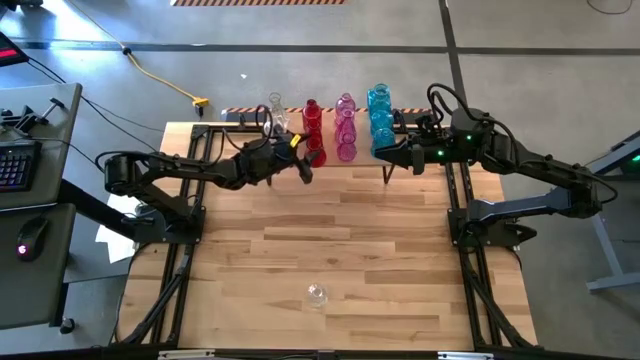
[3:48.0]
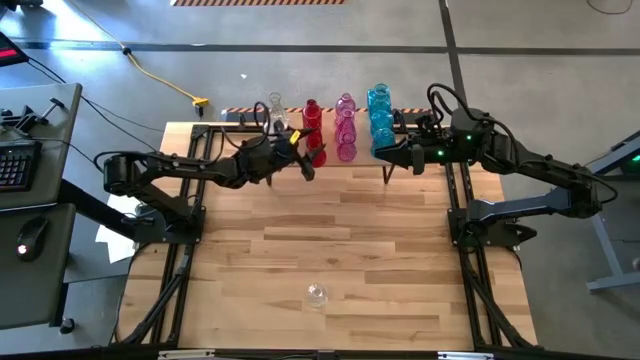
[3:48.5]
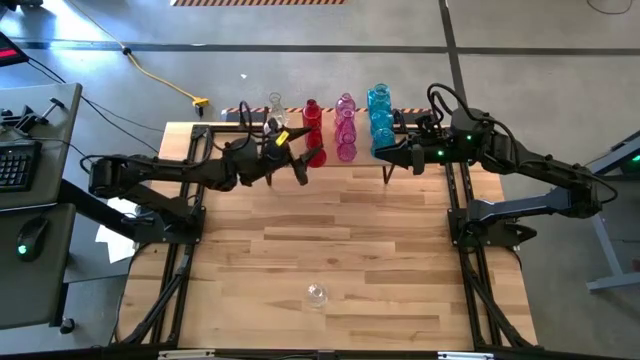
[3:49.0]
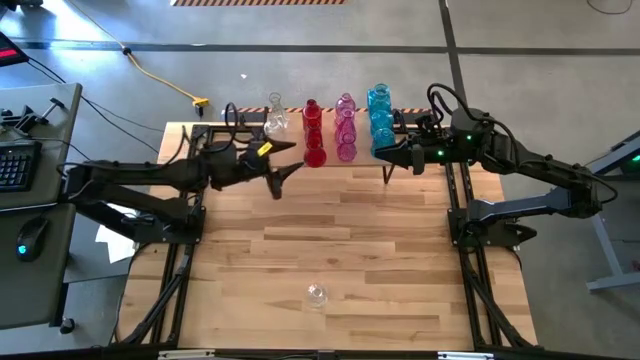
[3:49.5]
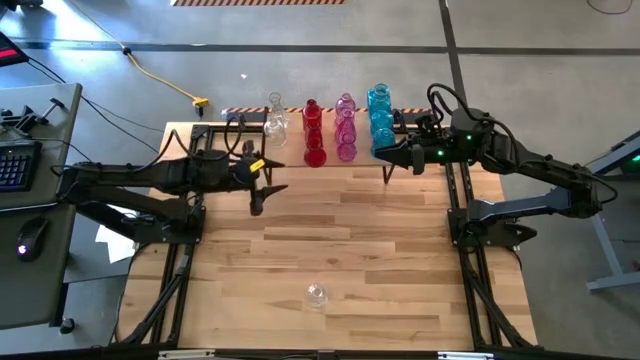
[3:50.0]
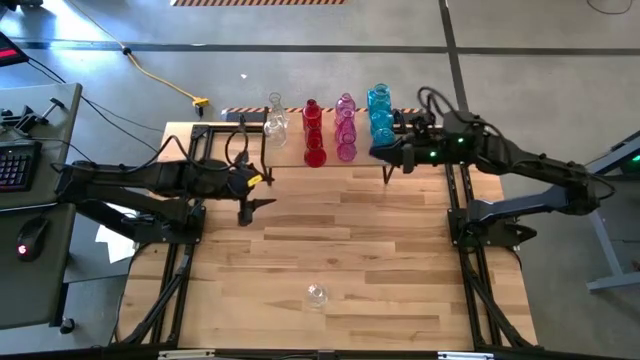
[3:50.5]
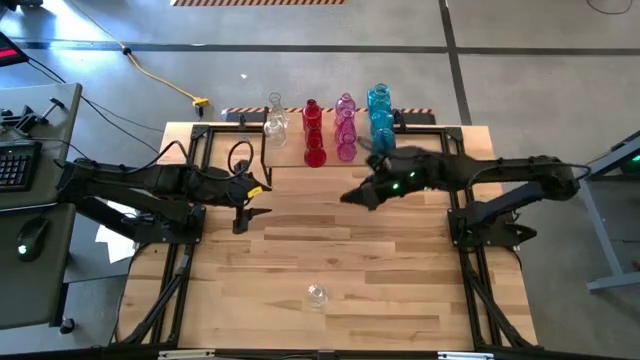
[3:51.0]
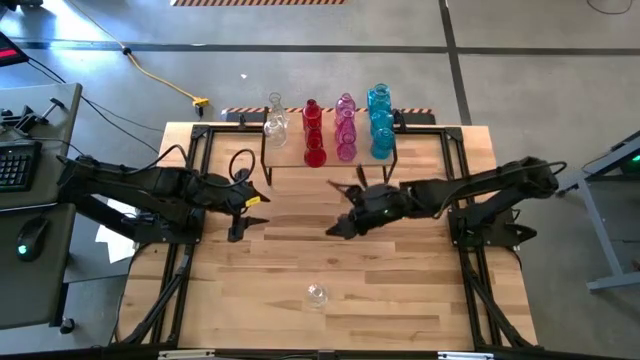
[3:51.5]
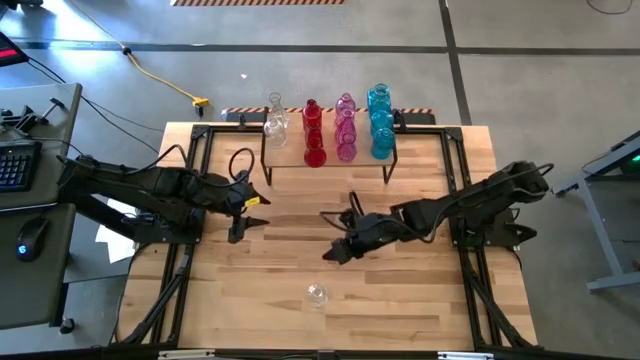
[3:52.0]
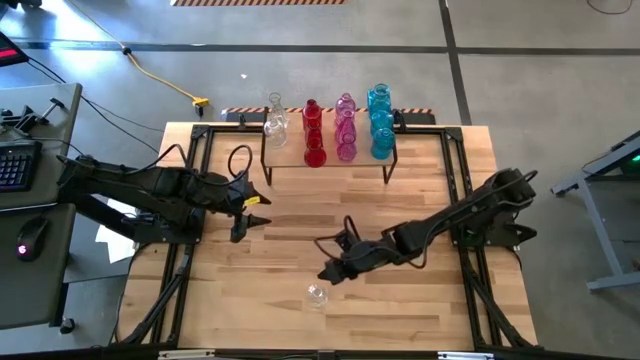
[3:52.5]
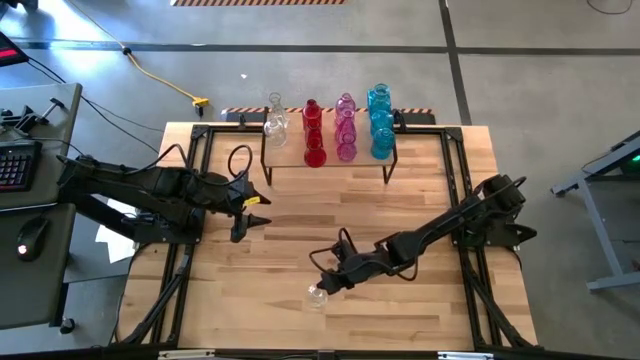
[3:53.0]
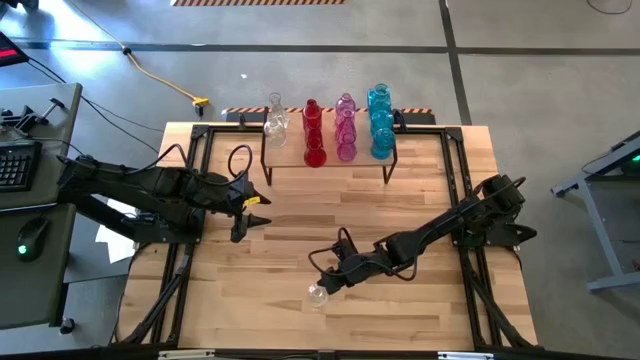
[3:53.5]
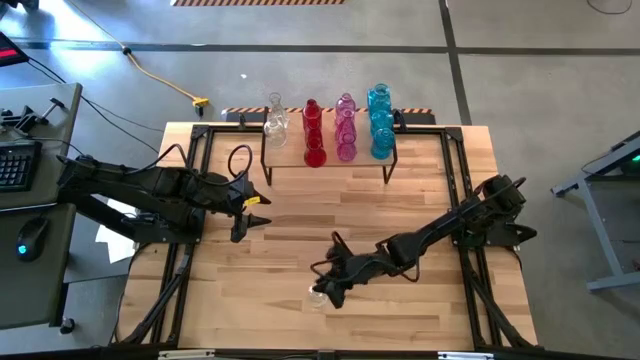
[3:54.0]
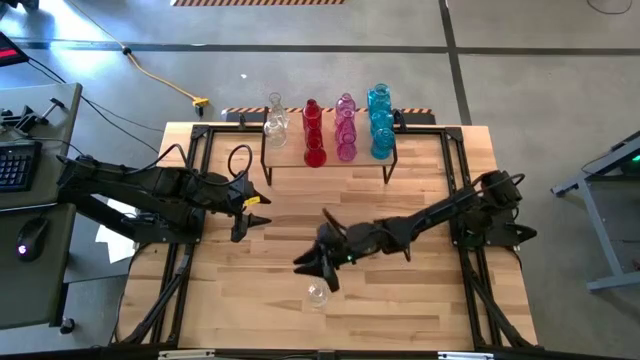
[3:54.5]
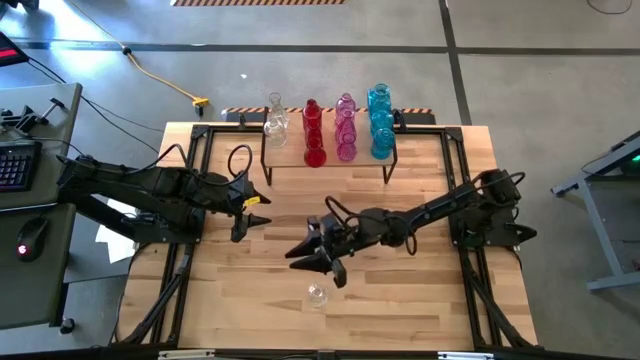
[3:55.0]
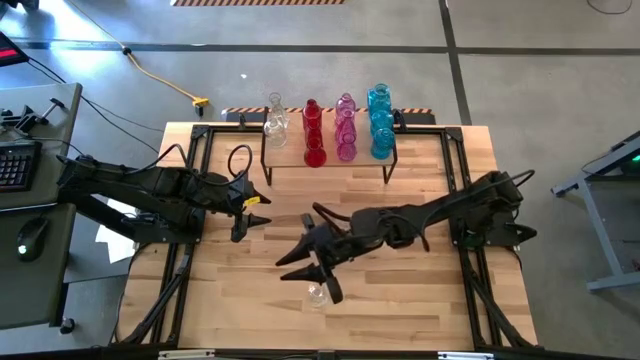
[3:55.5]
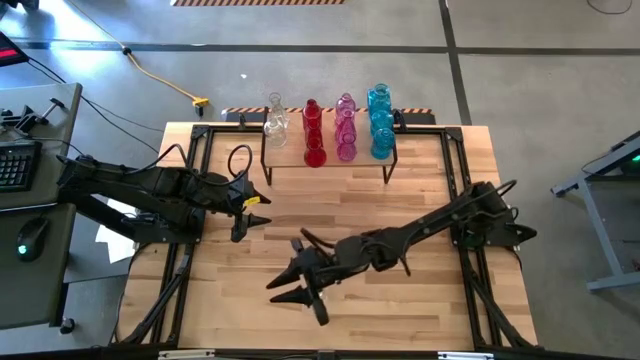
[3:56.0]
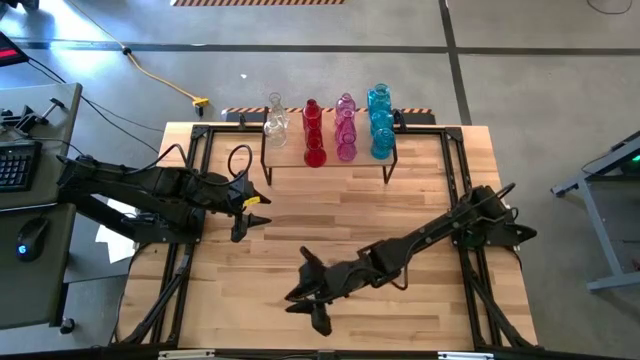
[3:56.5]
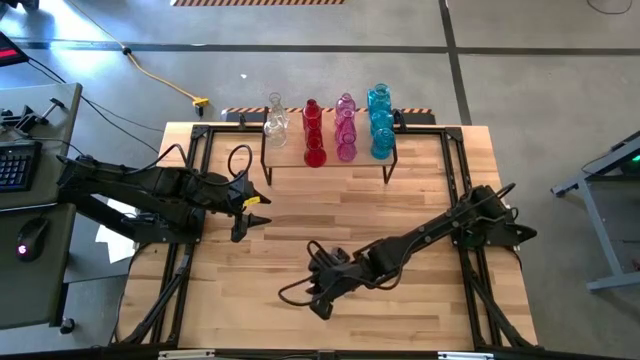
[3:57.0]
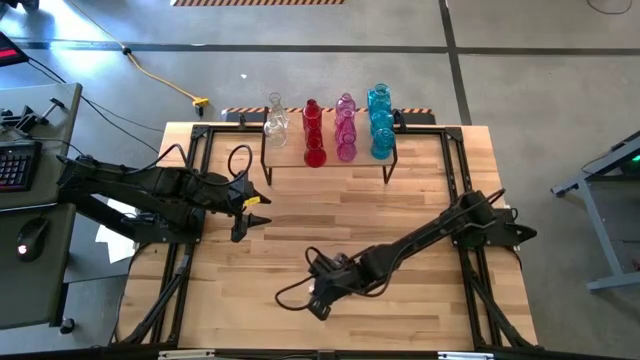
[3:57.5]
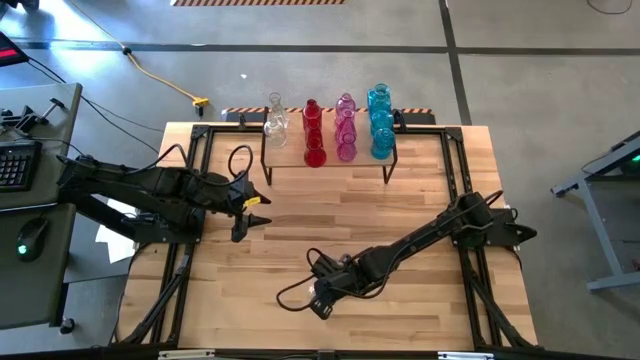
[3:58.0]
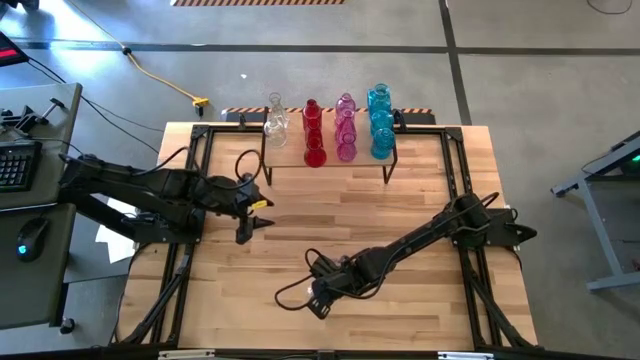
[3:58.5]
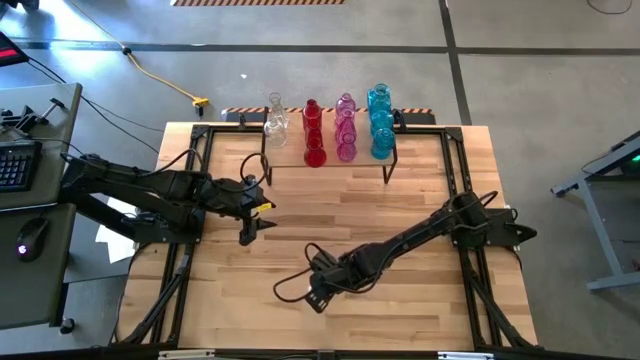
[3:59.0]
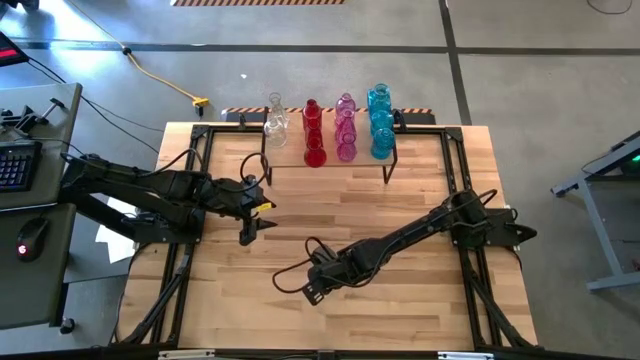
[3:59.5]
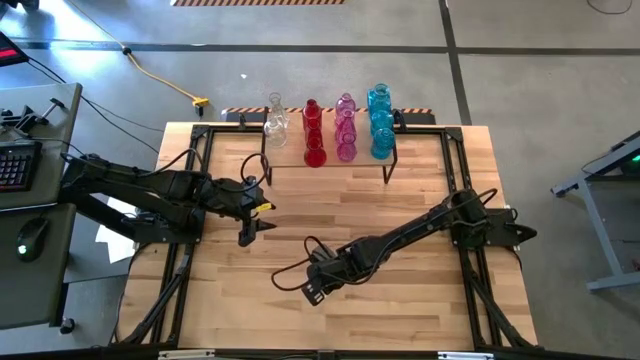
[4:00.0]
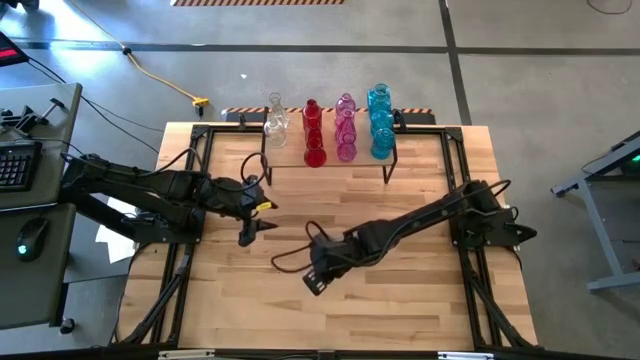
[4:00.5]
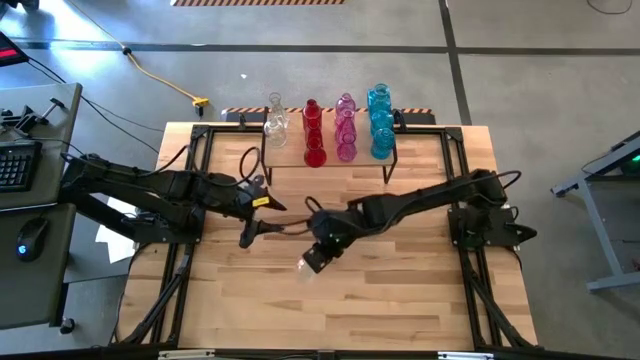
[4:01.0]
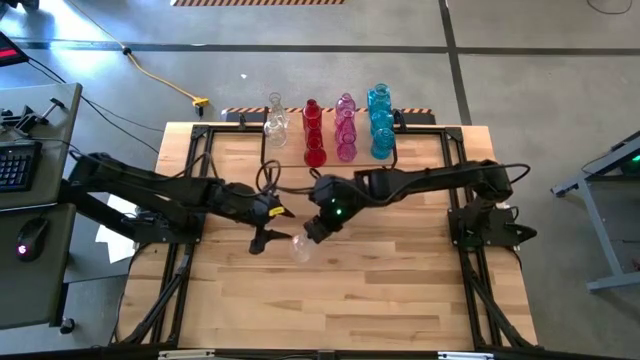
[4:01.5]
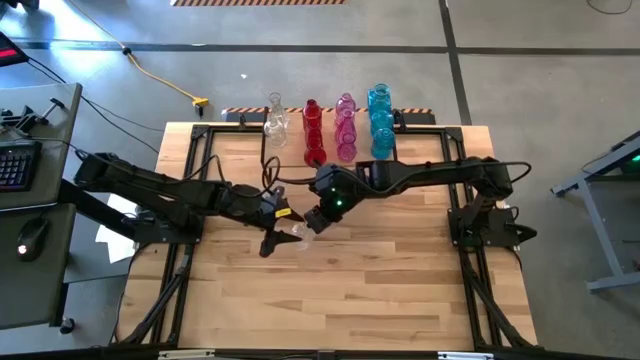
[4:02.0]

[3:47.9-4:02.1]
Task: sort vases onto shelf
Put the transparent vase on the shelf aligned with the other transparent vases
